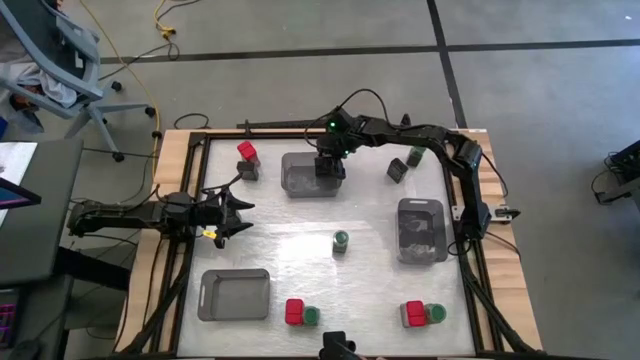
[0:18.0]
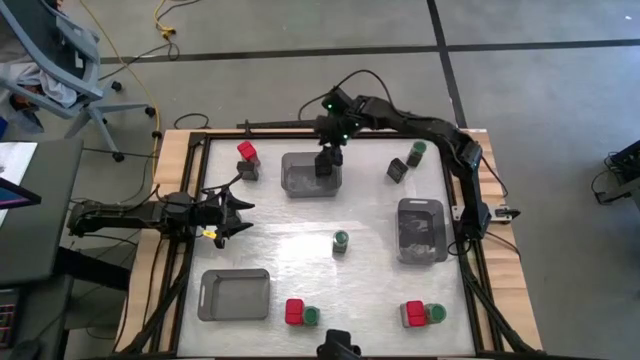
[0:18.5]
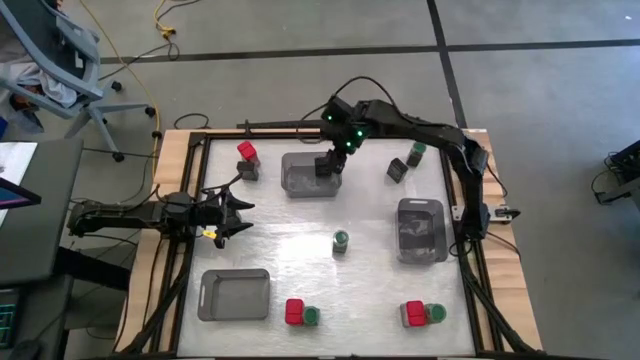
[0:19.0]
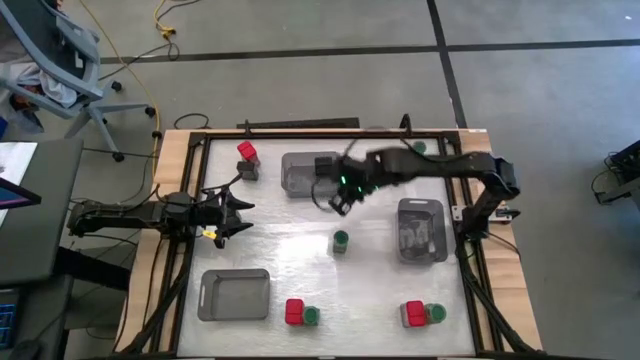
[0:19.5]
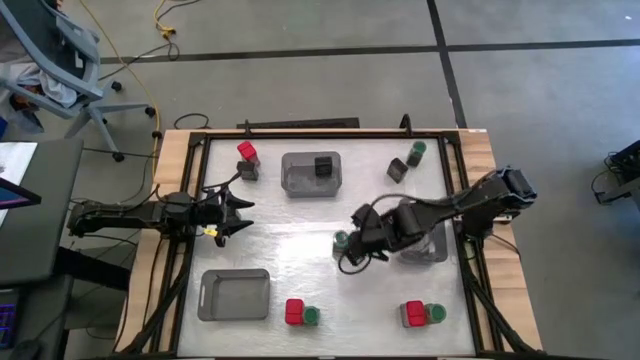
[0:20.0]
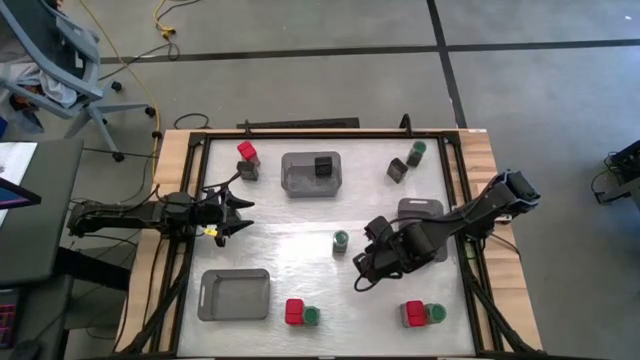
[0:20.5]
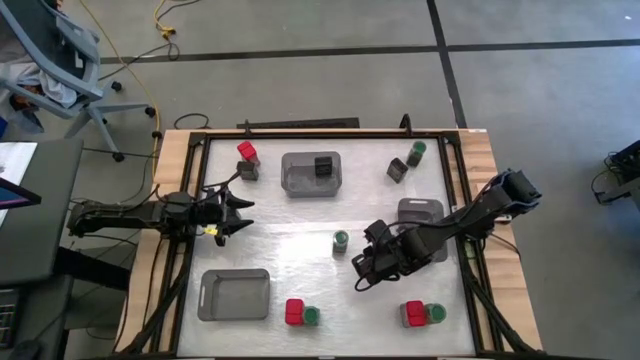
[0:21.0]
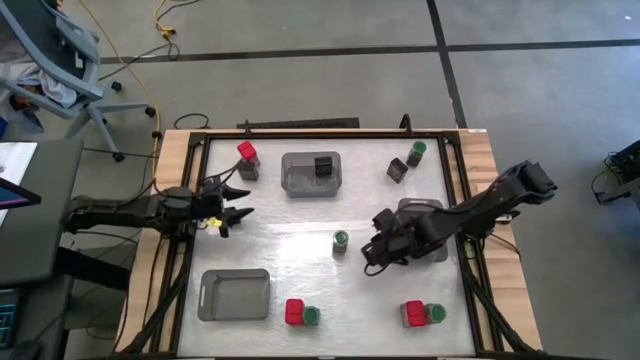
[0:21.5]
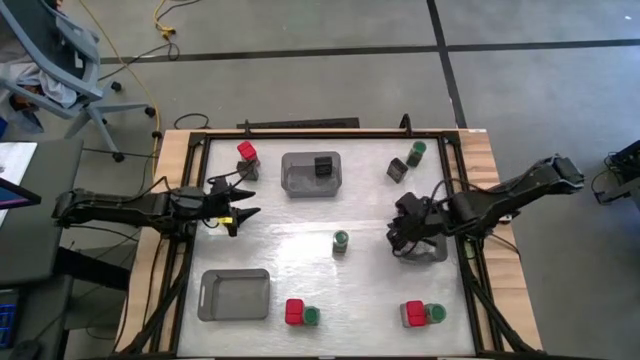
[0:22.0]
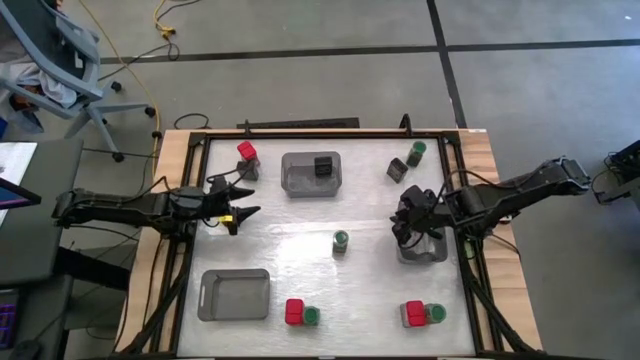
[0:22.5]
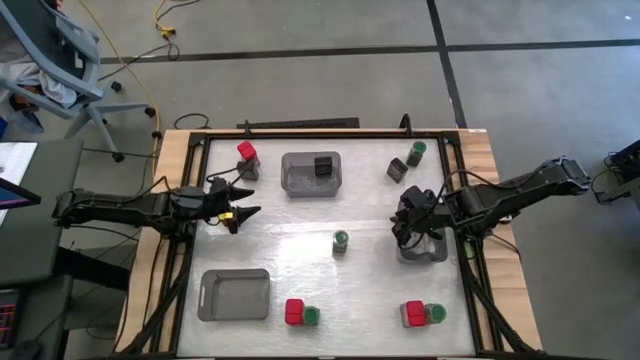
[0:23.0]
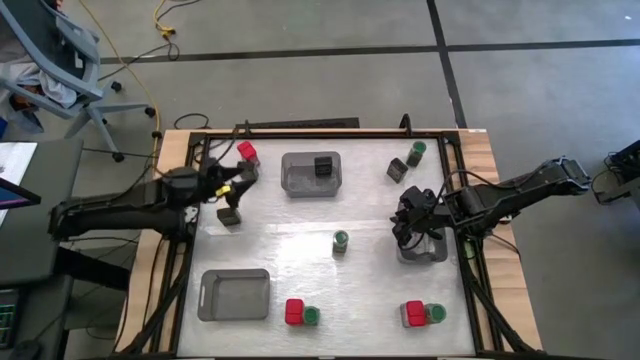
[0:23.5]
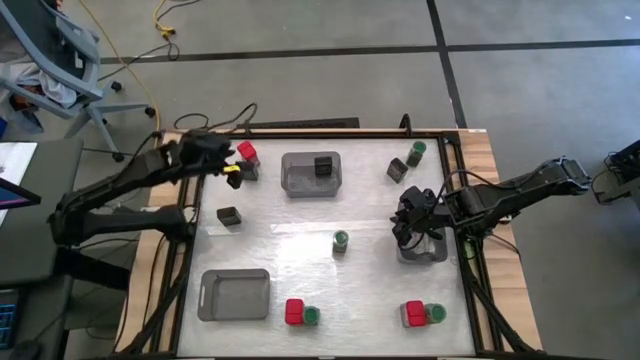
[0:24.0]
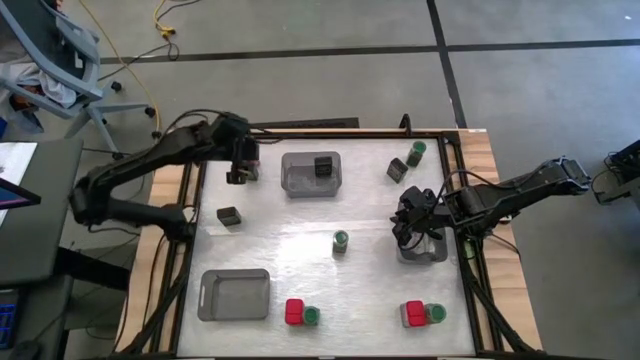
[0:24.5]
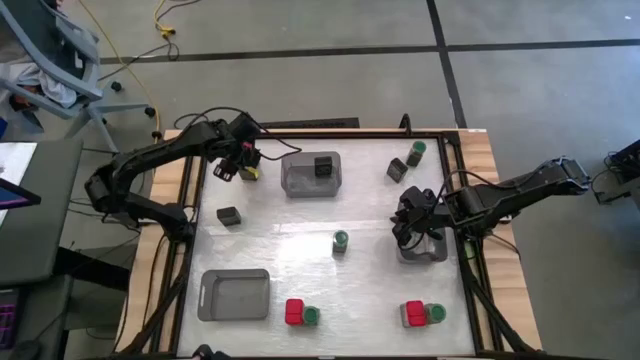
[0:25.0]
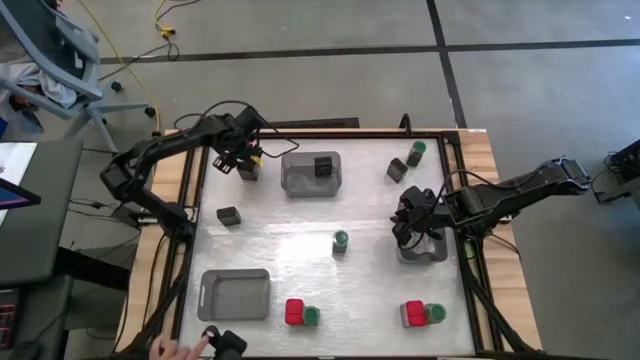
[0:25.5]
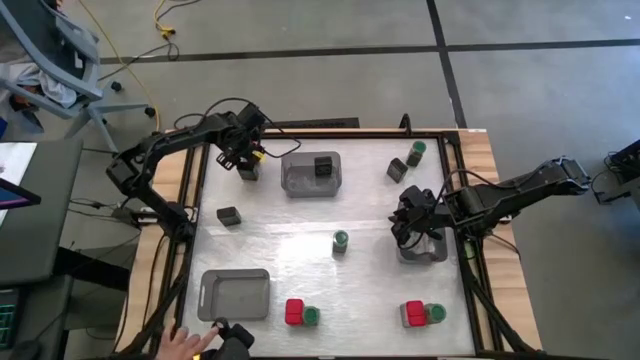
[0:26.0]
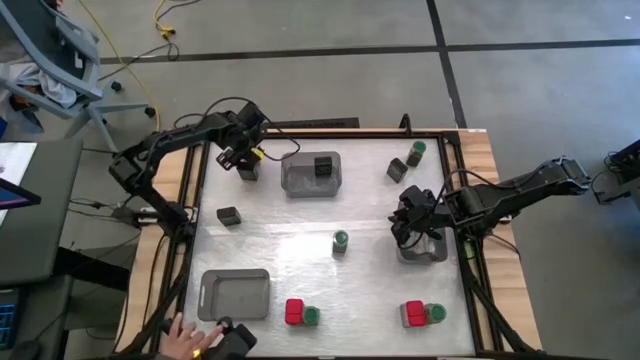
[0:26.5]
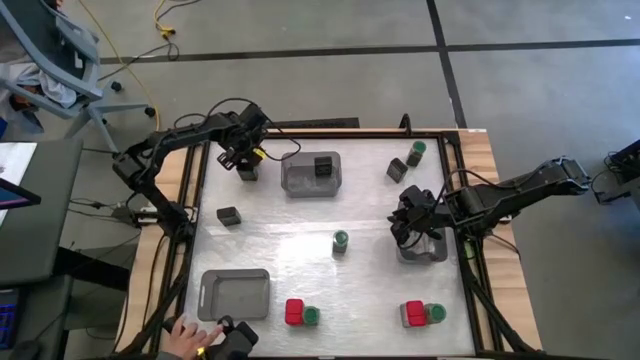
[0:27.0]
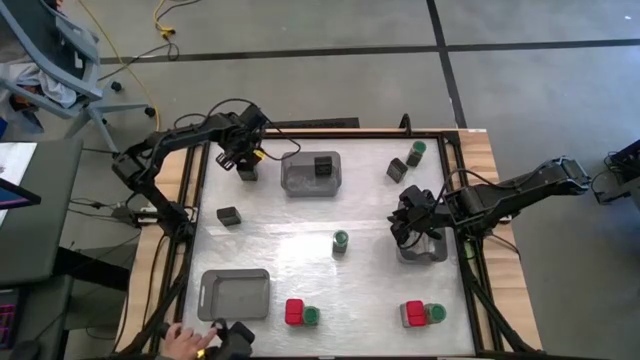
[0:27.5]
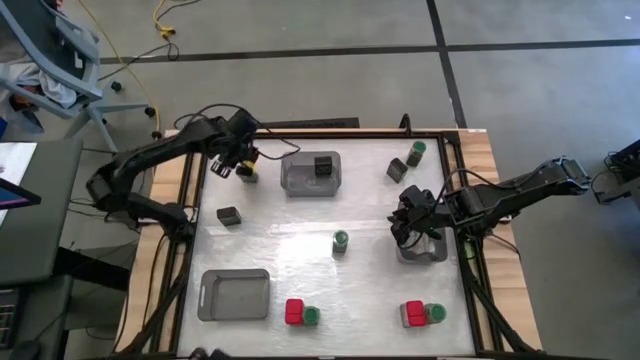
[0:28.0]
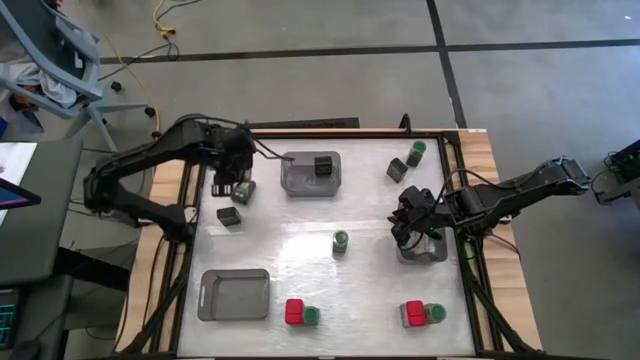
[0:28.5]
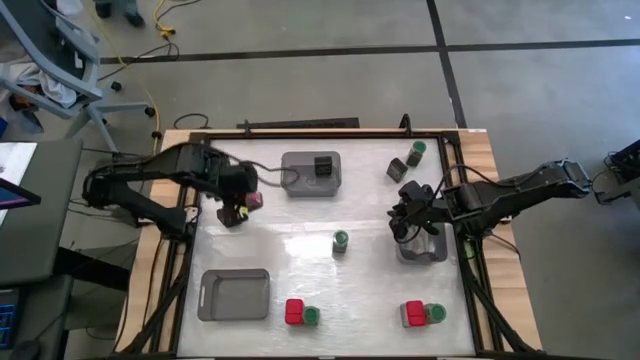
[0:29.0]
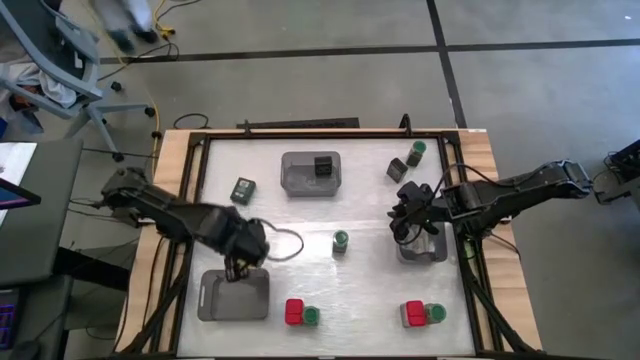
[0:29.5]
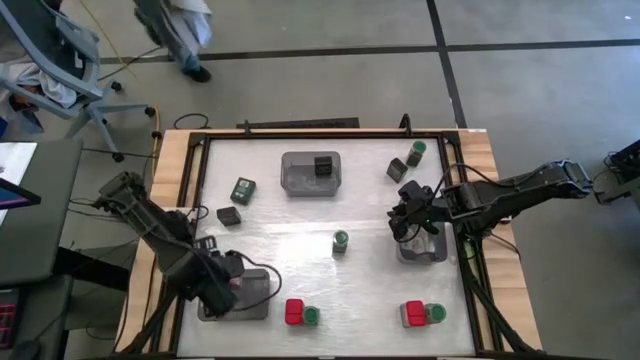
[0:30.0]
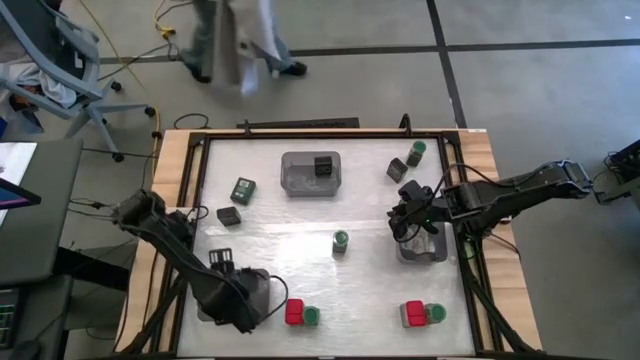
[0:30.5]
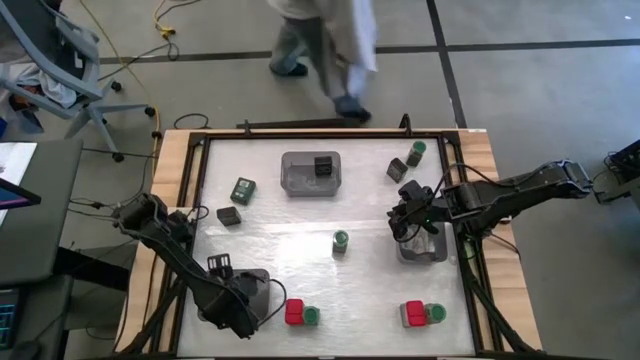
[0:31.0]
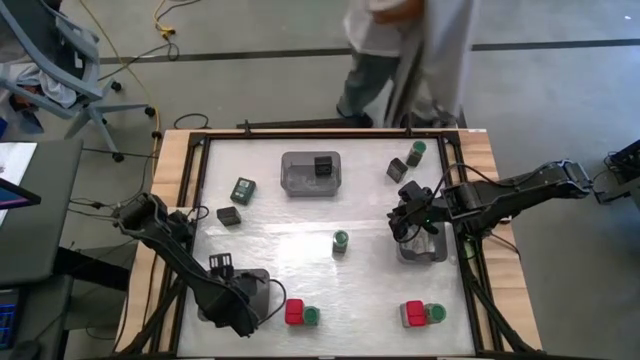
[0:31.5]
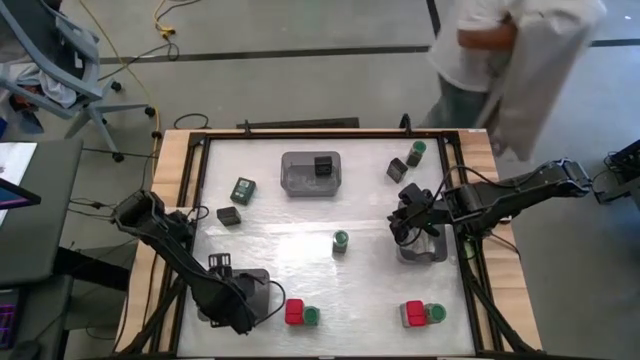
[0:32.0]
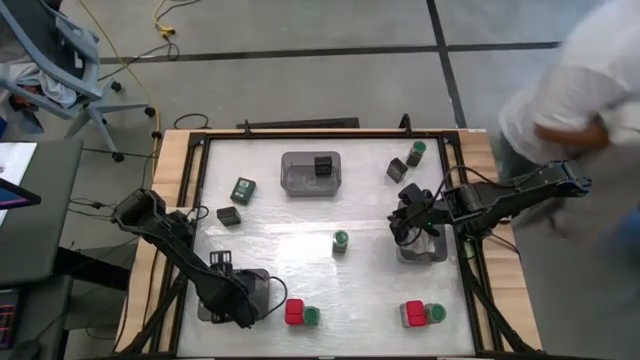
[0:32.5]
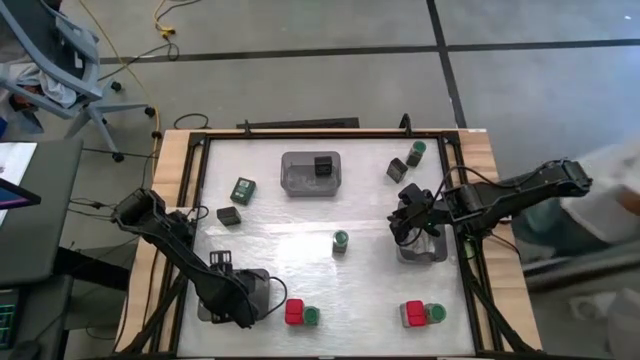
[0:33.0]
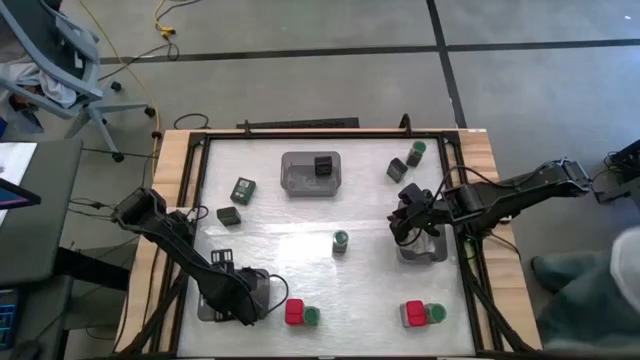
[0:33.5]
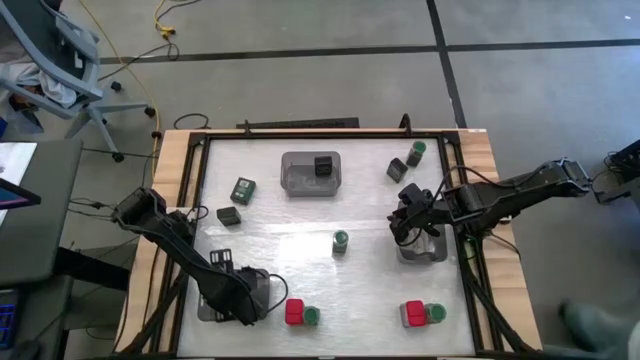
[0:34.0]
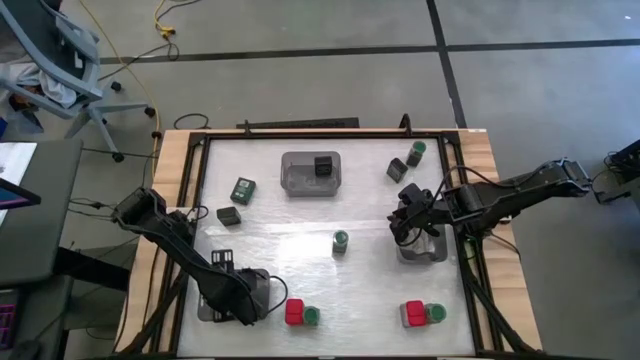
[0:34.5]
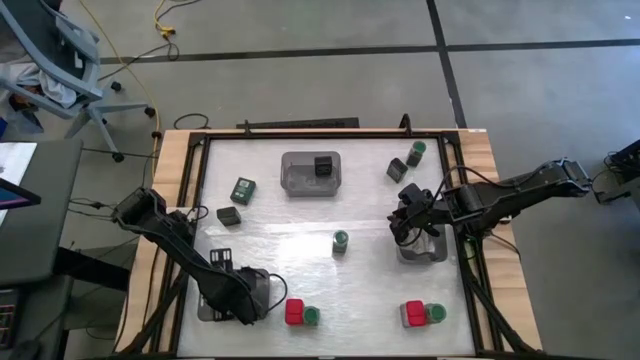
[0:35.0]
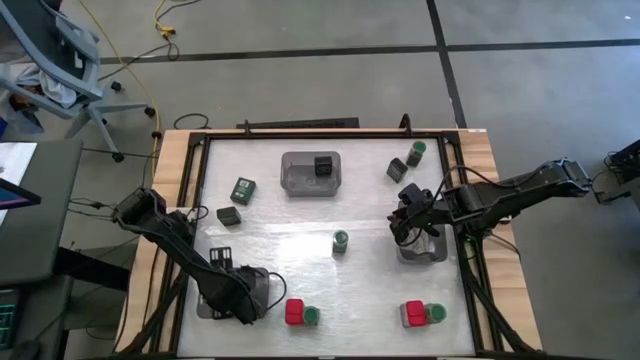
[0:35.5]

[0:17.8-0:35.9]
Task: Sort spices by type
Put the top left red seasoning can into the bottom black transparent bin

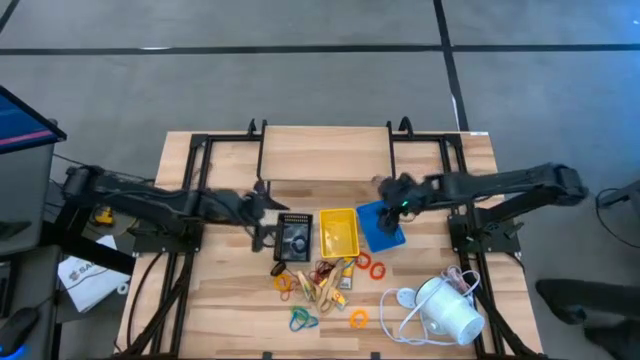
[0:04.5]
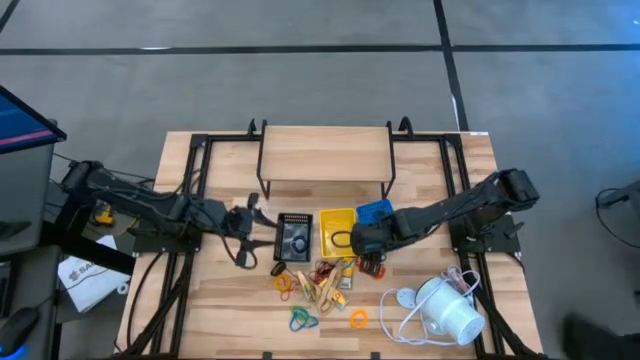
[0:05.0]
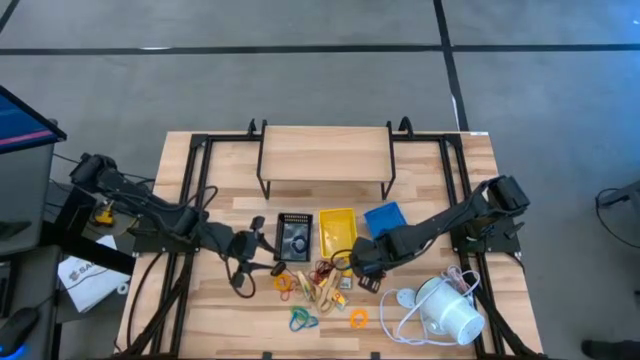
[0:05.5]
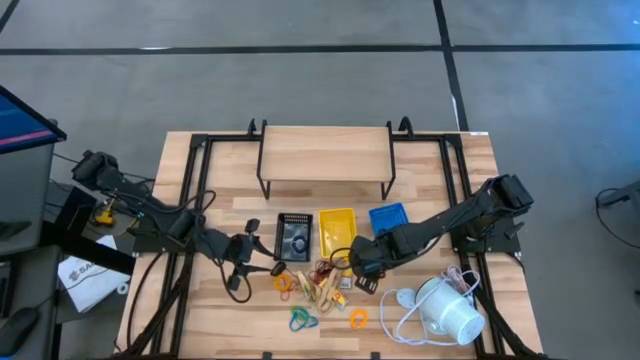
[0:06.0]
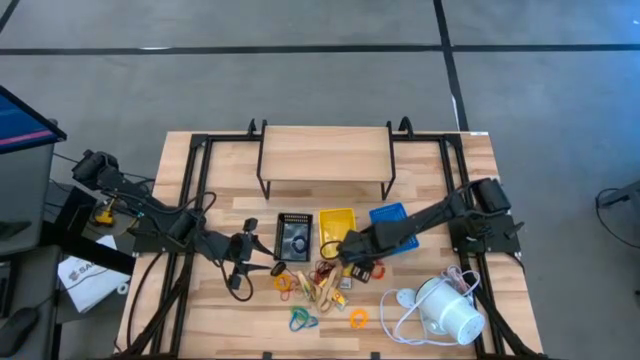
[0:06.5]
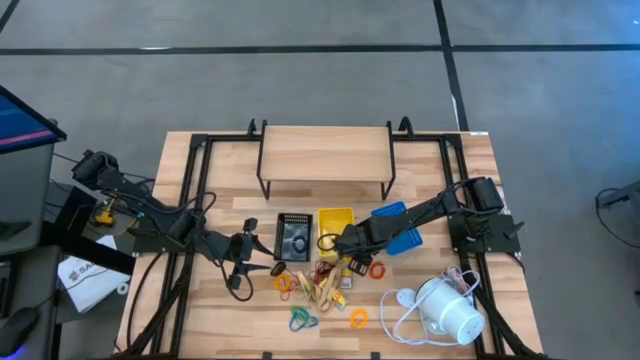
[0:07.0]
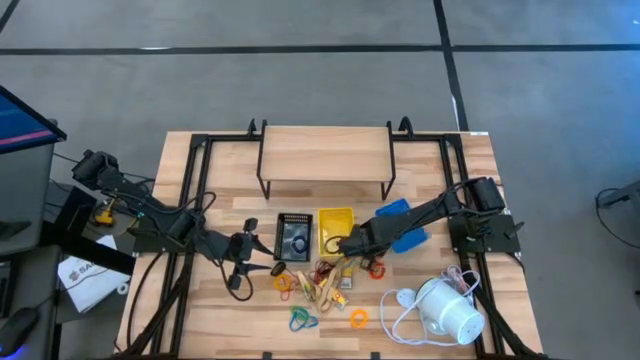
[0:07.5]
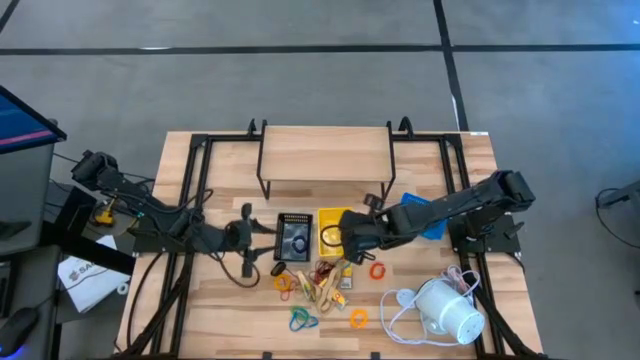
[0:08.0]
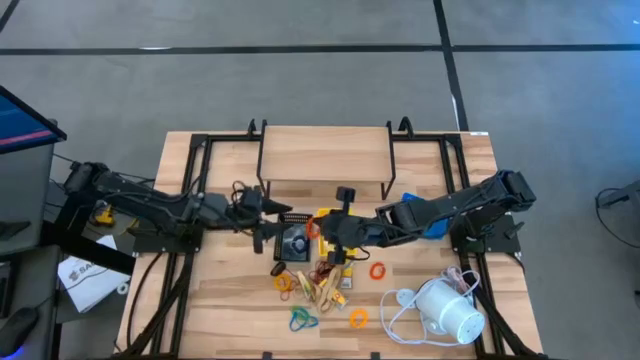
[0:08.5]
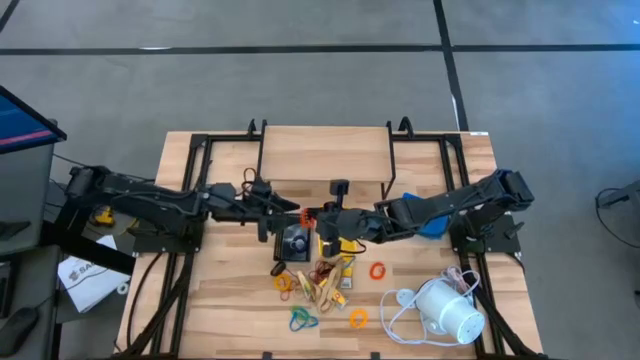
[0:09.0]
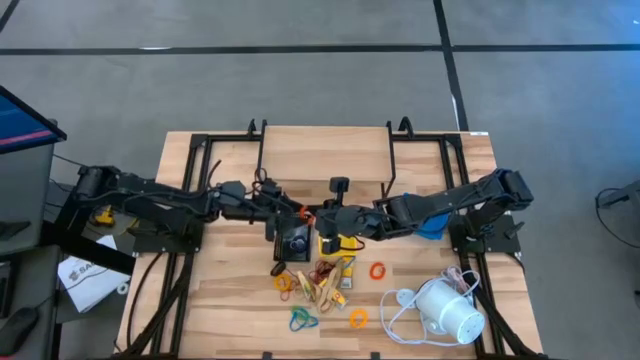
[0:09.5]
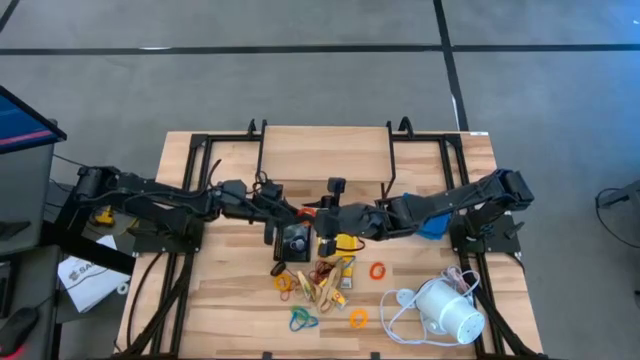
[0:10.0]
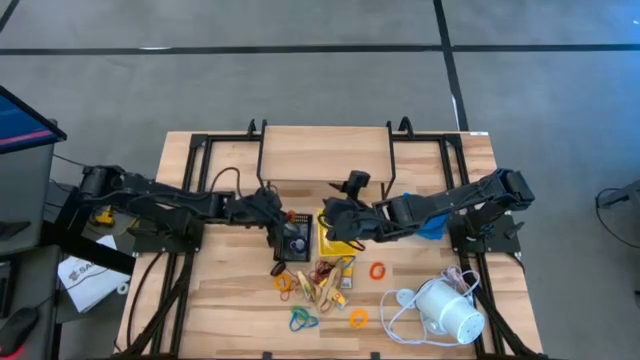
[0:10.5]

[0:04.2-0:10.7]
Task: Pick & Place Office Desk Supplies
Put the orange spring keychain into the black bin
